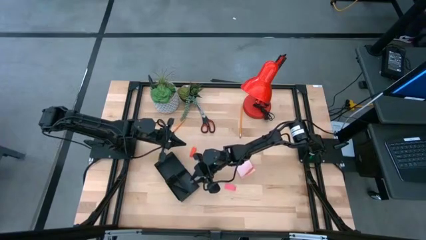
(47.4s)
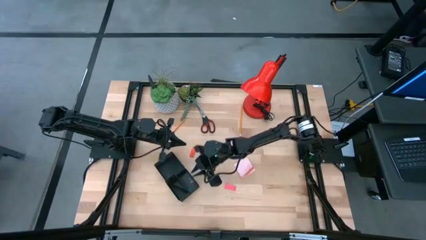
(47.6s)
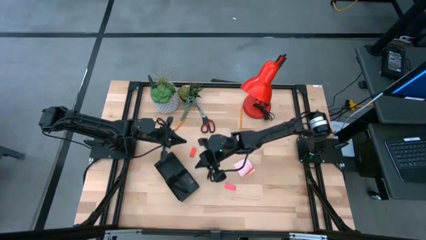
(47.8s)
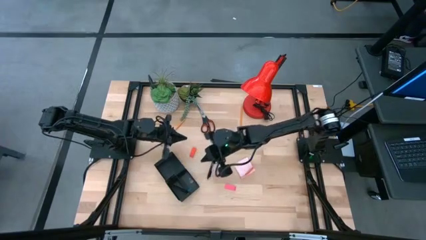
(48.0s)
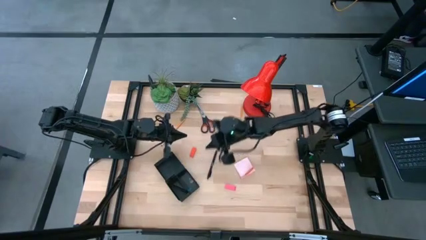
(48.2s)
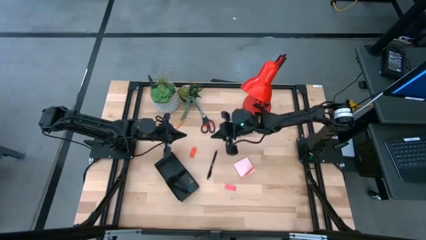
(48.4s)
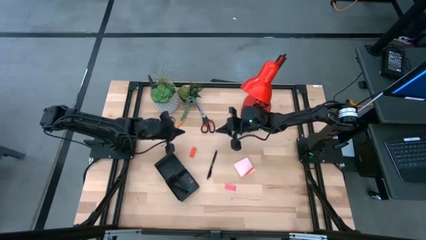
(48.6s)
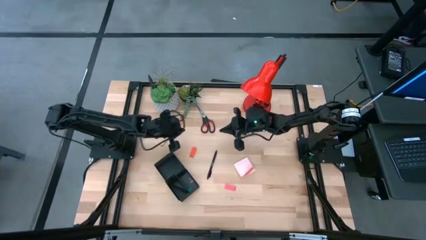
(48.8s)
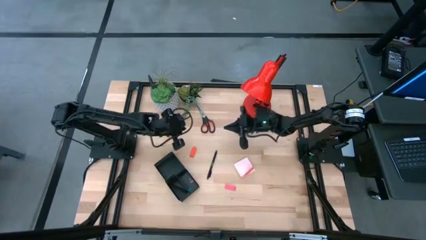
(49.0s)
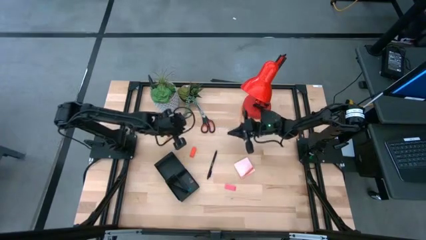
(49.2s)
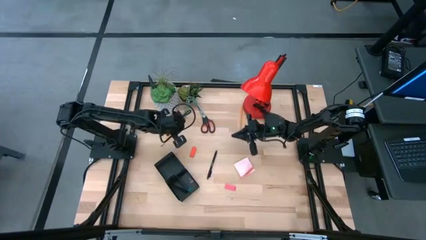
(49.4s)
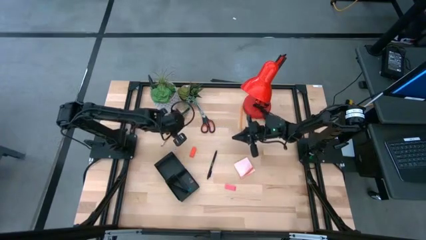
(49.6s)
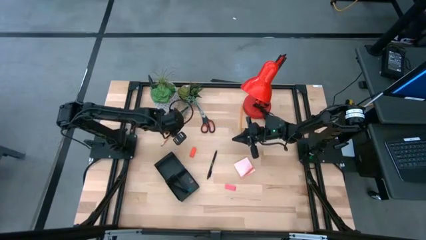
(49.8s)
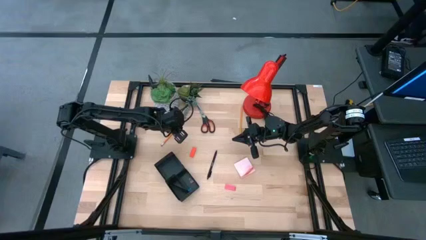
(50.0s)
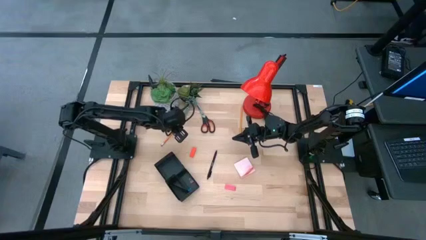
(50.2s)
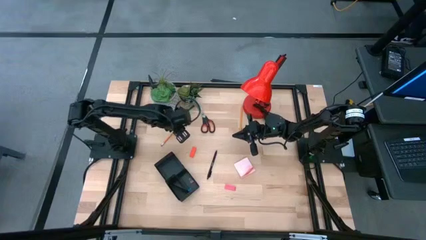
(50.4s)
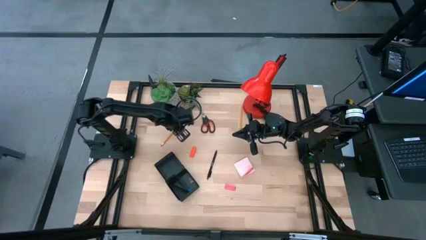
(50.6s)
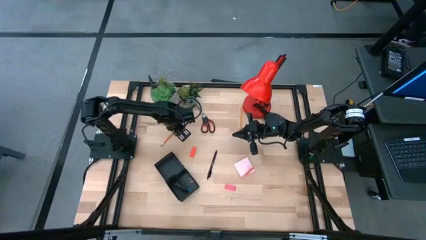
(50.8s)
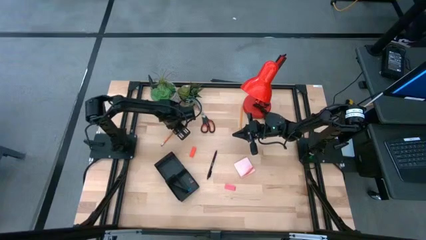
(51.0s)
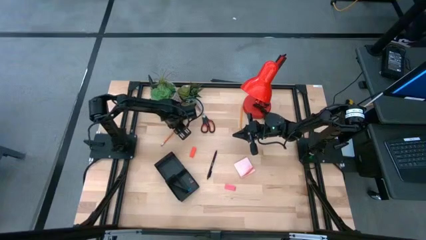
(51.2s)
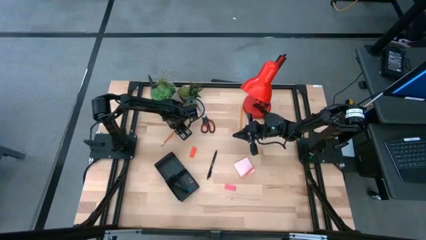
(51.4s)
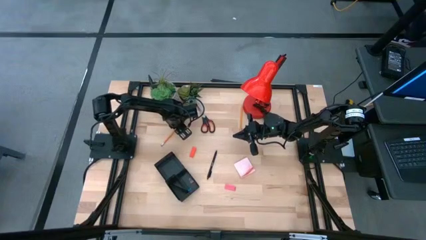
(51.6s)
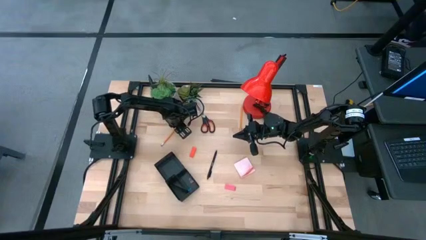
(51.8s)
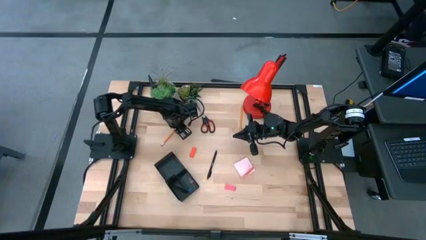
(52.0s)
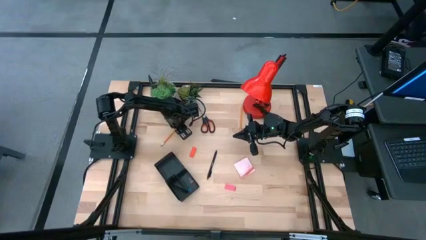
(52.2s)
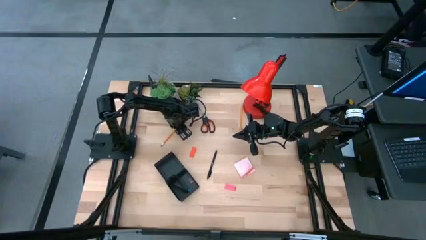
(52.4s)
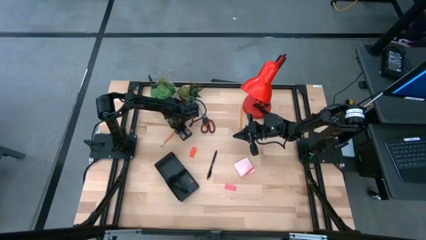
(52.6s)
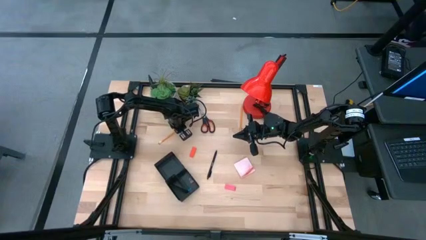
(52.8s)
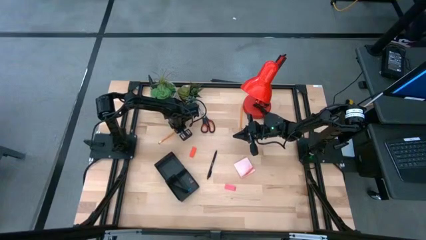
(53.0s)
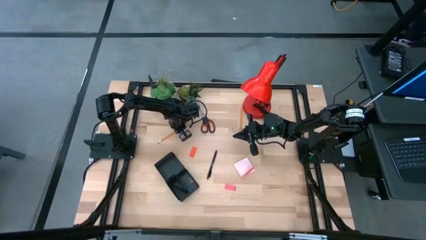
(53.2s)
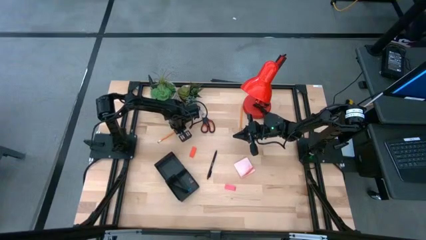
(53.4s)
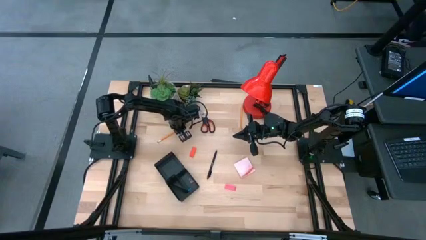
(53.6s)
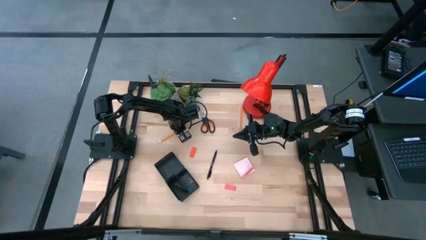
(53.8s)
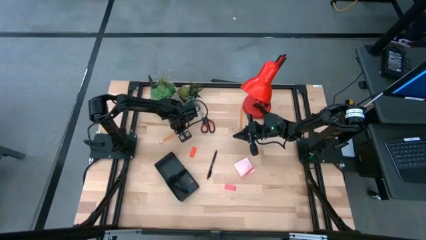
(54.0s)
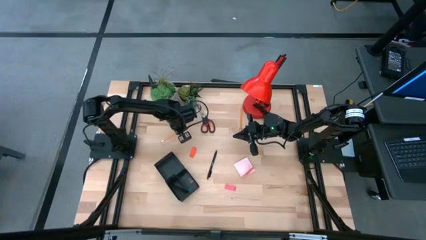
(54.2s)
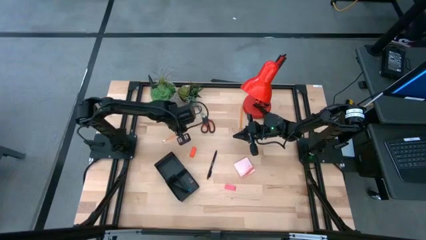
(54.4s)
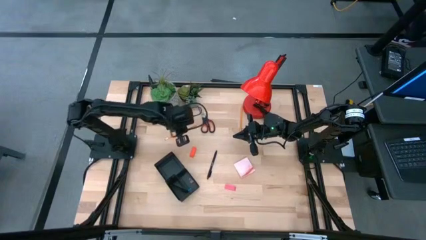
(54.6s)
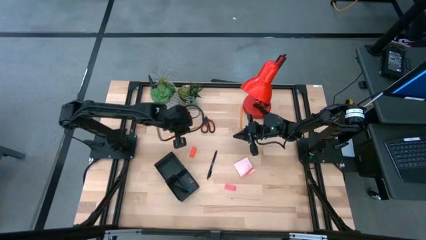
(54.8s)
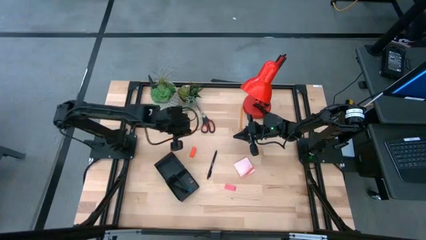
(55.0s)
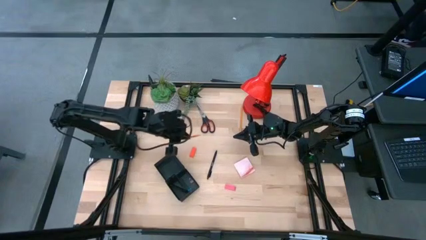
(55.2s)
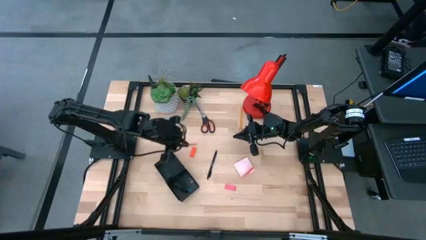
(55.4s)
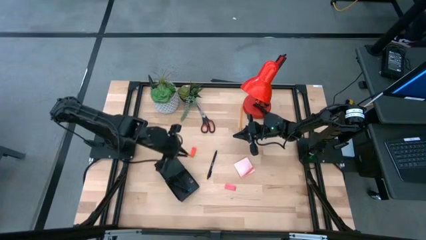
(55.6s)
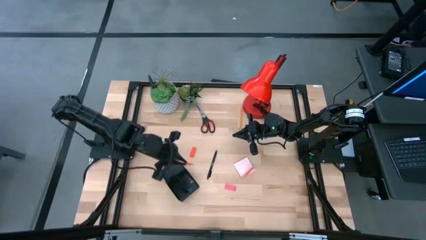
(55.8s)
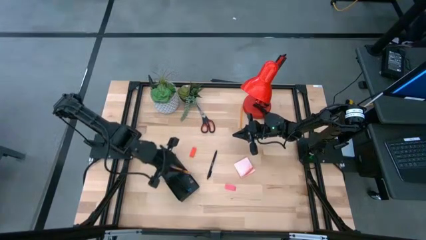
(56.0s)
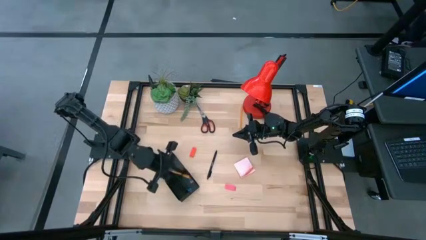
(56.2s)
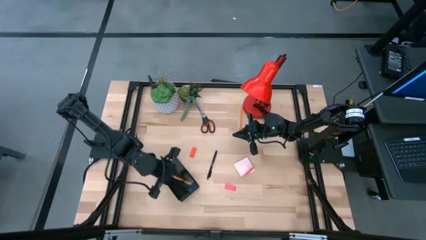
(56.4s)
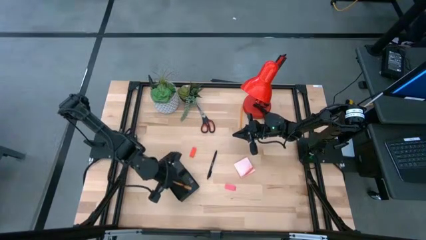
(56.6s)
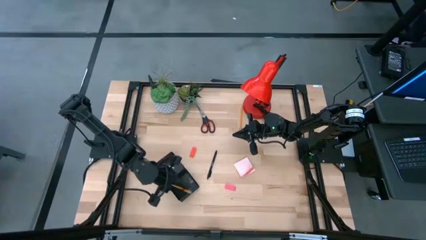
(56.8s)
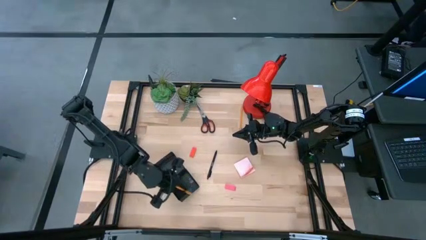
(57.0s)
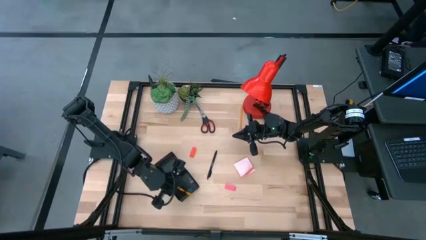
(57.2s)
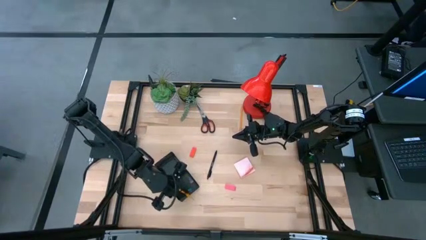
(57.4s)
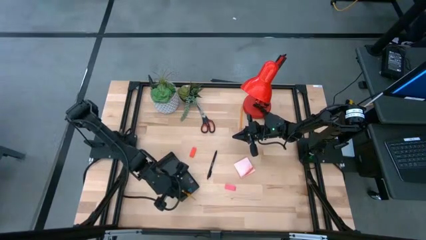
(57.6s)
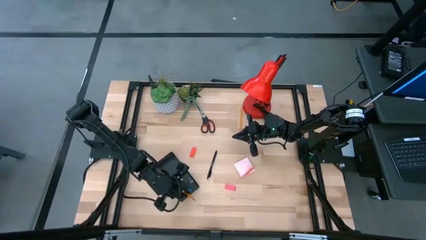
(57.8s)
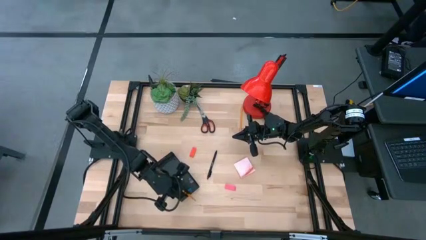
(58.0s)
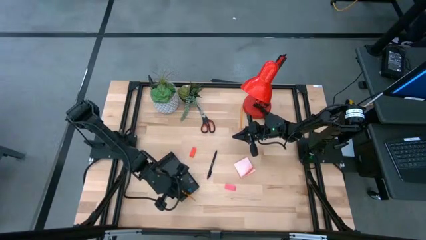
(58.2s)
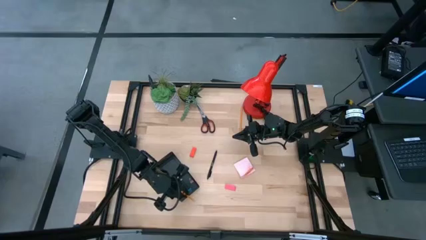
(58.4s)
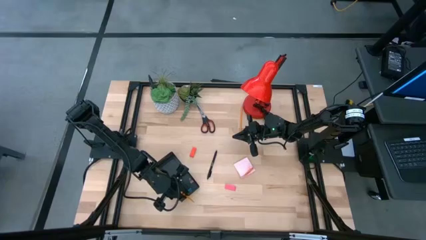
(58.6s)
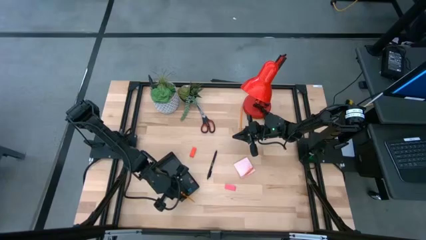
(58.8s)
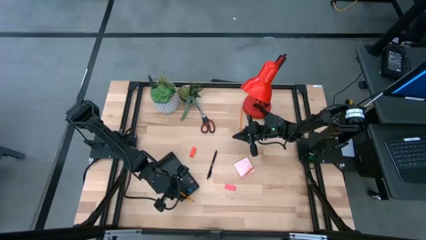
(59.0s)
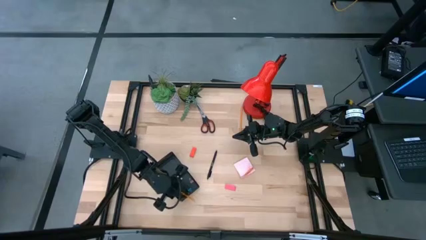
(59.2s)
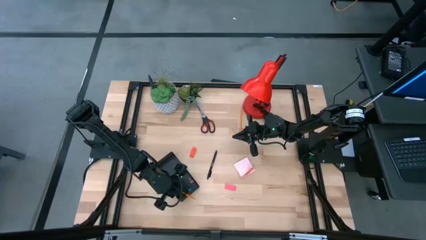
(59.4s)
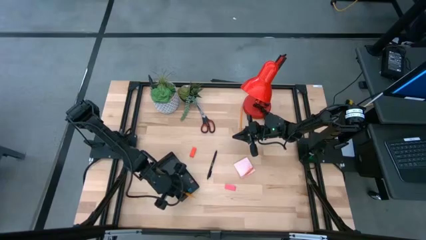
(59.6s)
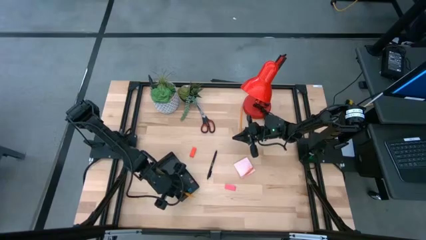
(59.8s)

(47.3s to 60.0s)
Task: Pick and place office supplies into organizer
Put the left yellow pencil into the black desk organizer
